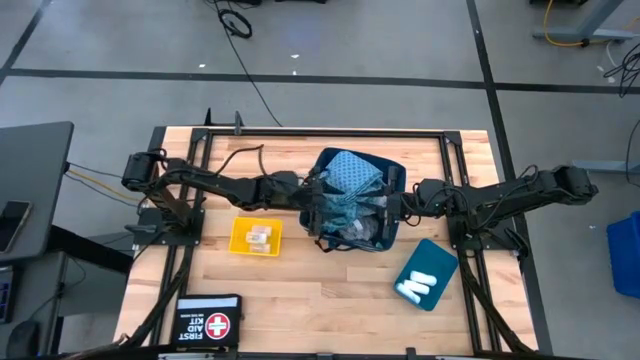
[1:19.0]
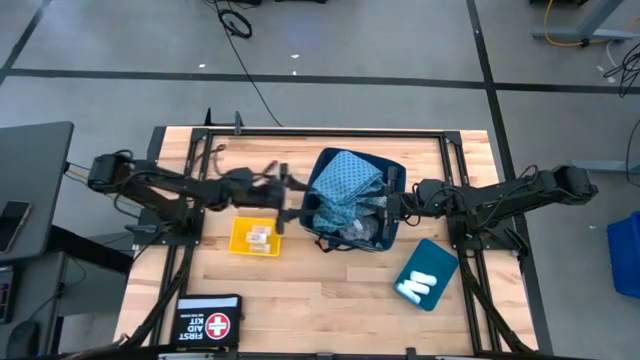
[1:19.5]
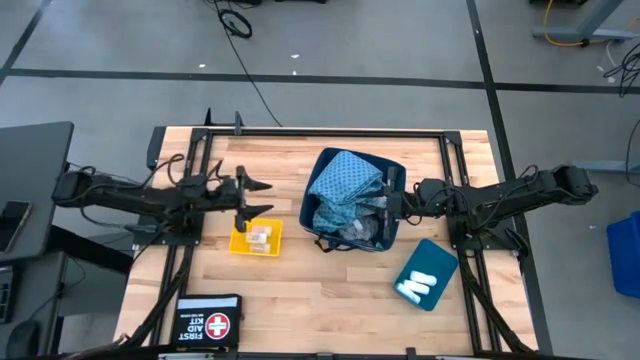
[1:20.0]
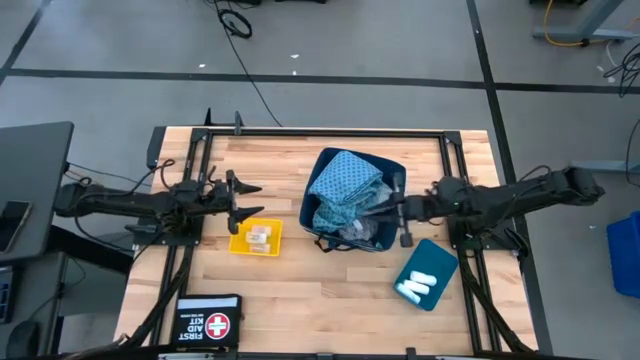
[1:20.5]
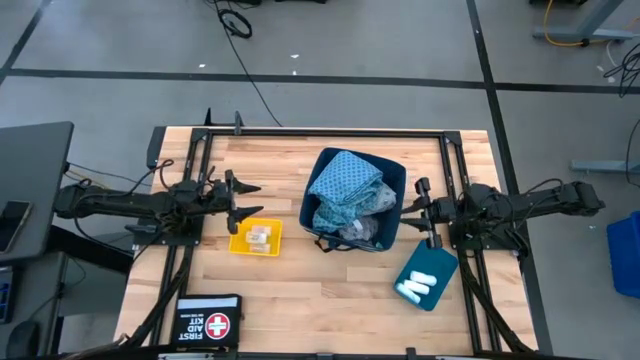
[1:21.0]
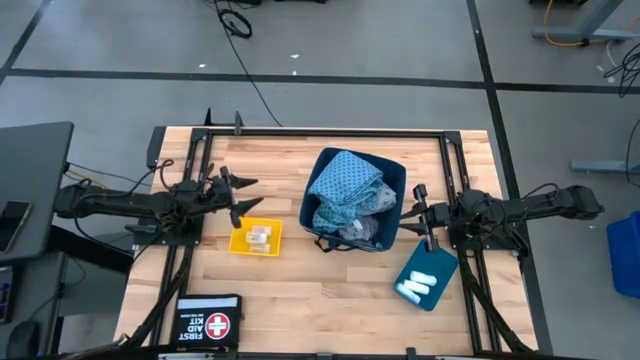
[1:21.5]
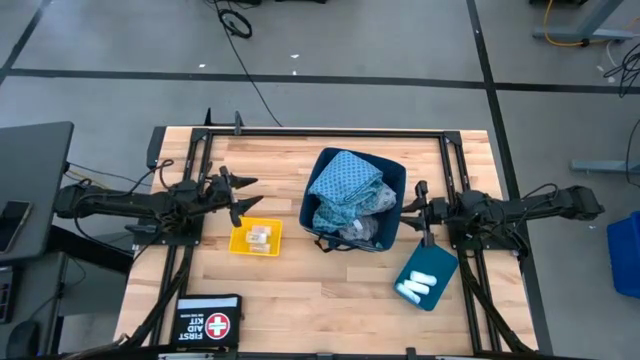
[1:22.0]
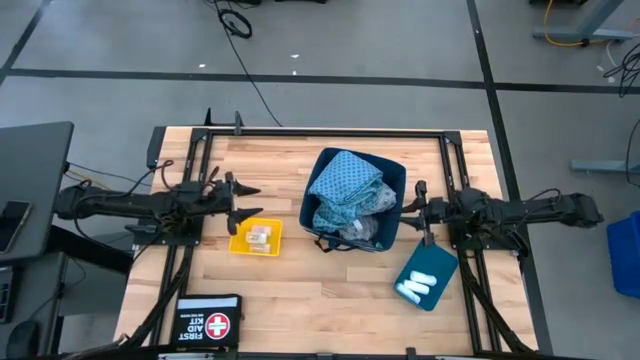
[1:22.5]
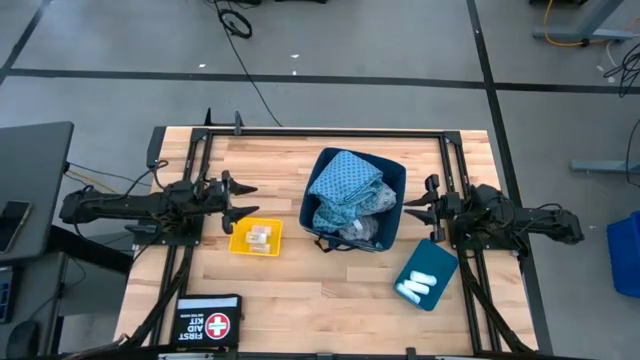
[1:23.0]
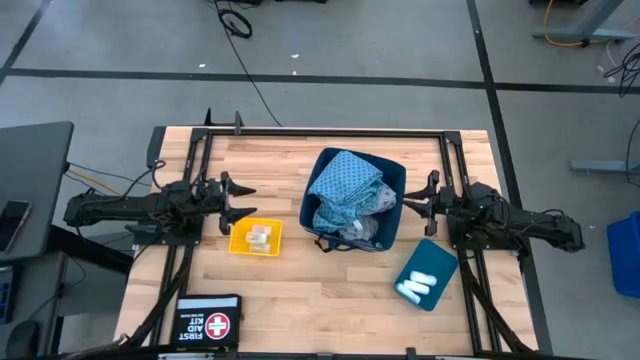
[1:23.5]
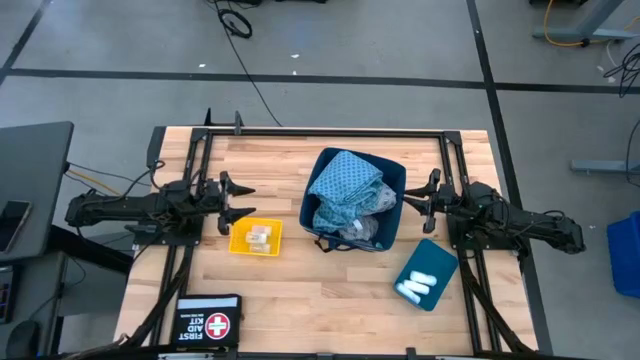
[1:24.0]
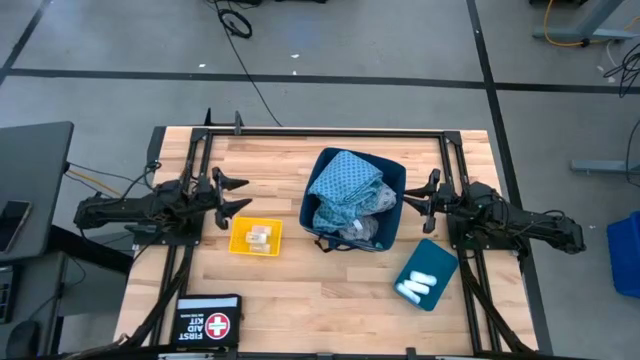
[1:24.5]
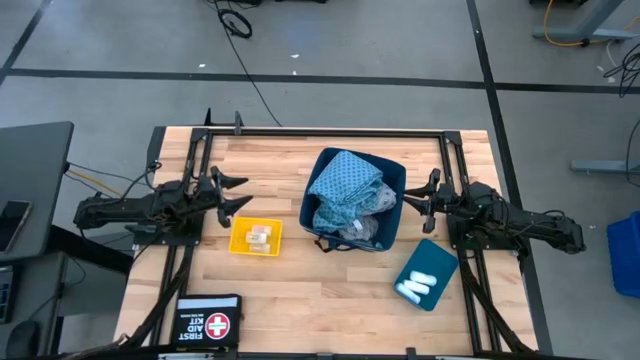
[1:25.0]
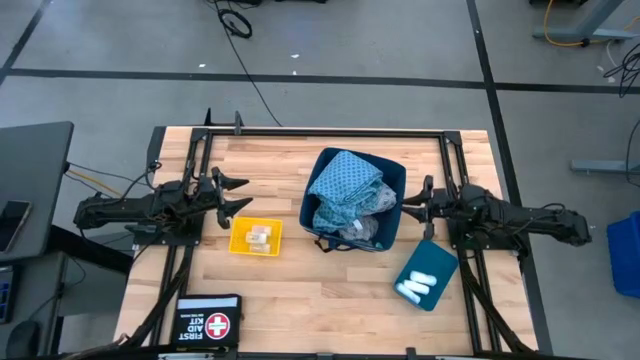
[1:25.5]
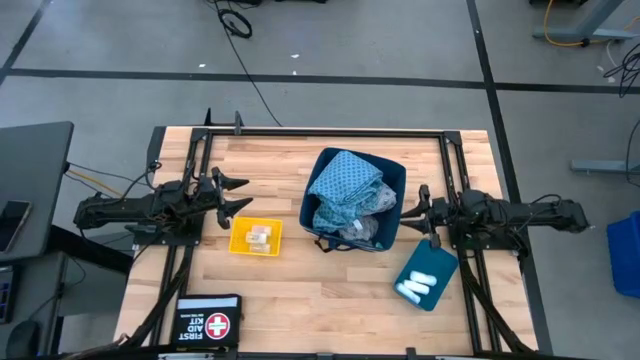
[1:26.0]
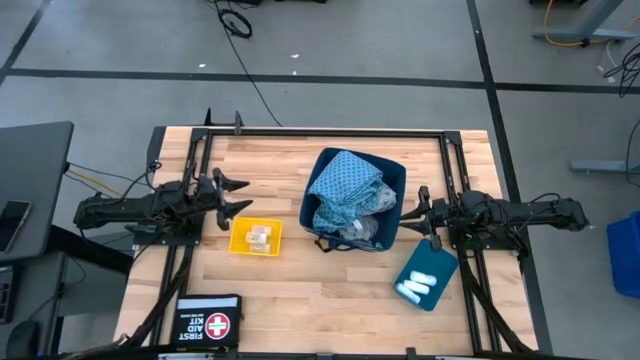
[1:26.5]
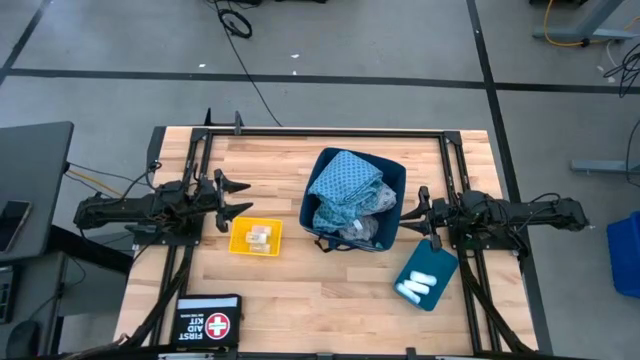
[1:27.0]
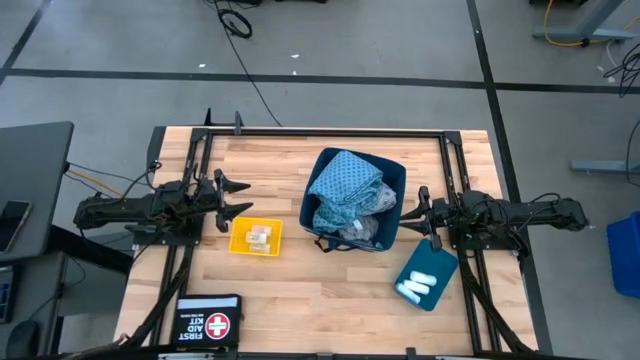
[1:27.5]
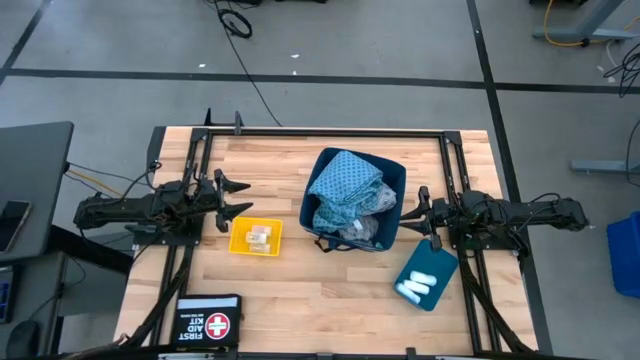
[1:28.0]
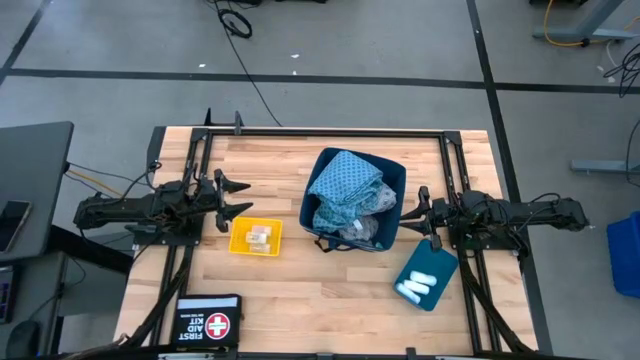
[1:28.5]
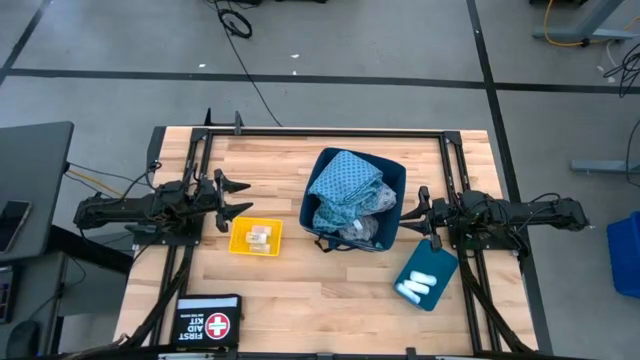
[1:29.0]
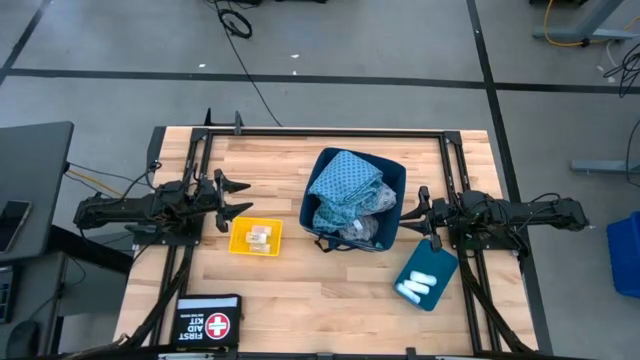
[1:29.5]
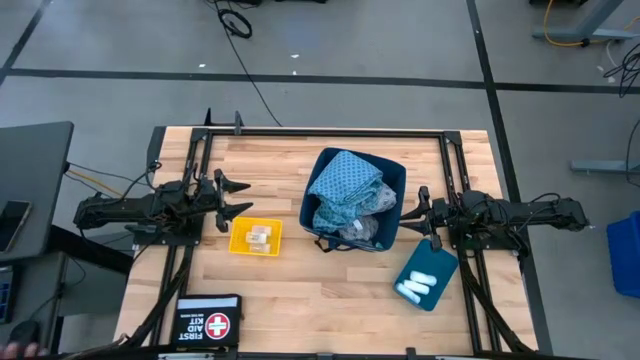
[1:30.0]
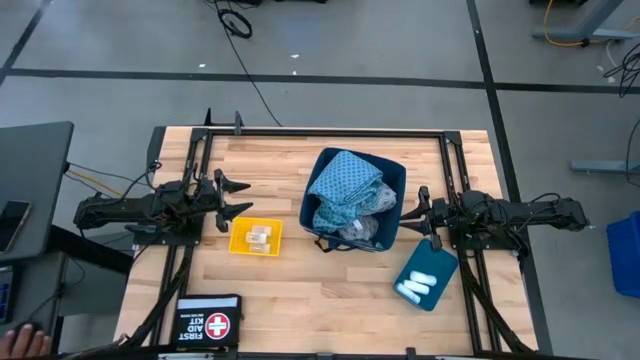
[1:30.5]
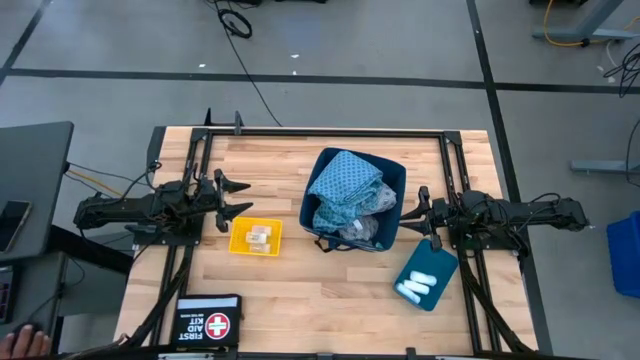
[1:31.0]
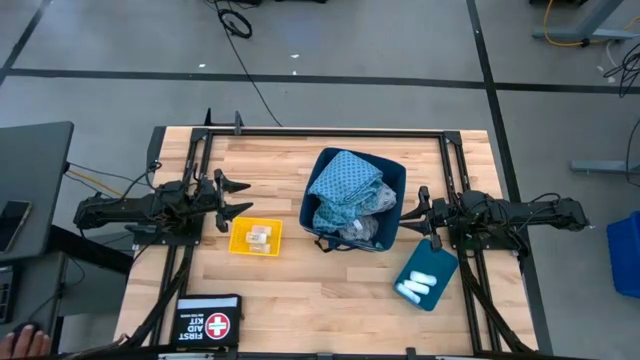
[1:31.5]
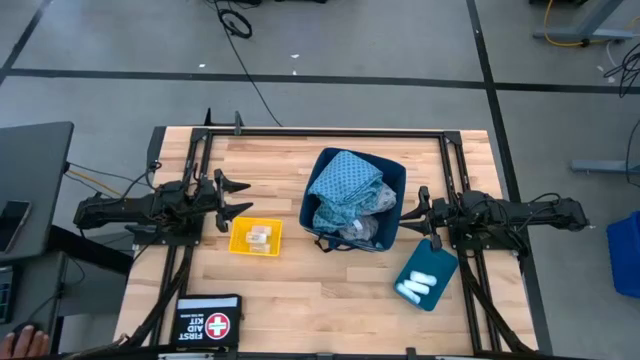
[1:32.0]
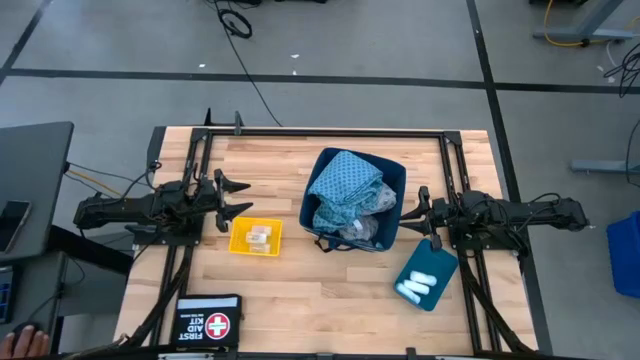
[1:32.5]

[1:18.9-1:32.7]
Task: Pick & place medical supplies in basket/bin
Return to Home Position

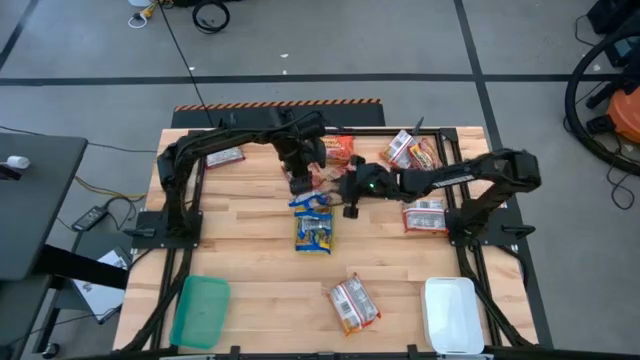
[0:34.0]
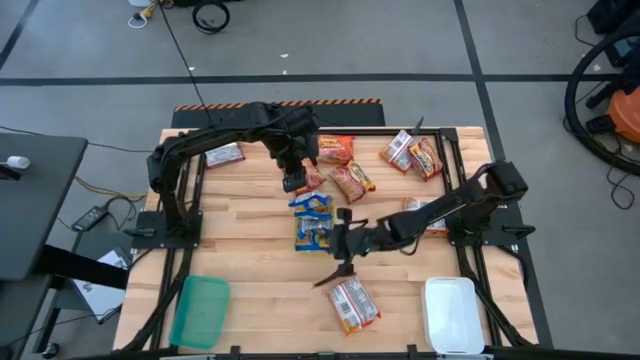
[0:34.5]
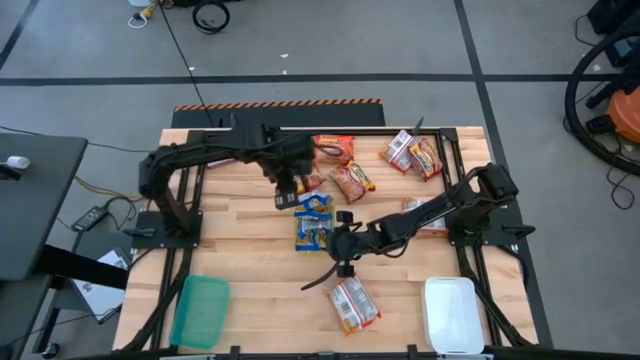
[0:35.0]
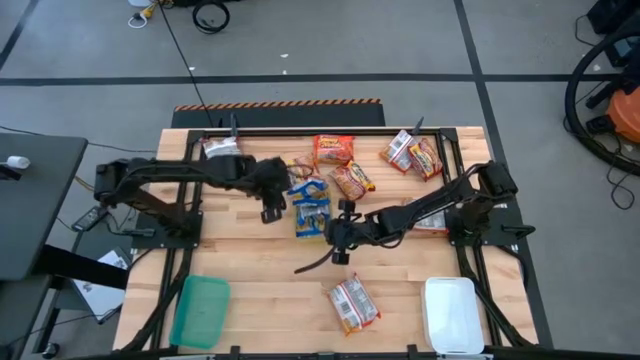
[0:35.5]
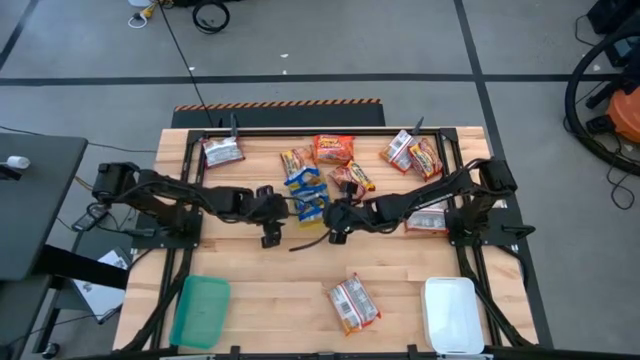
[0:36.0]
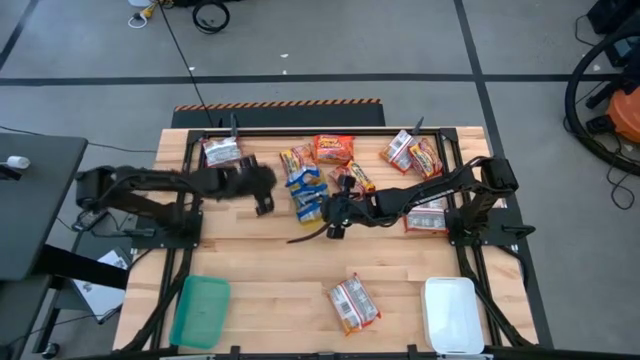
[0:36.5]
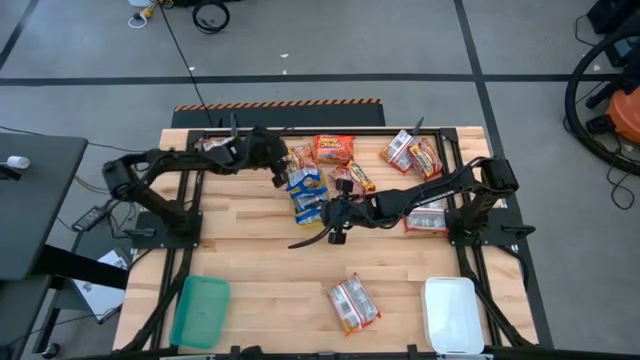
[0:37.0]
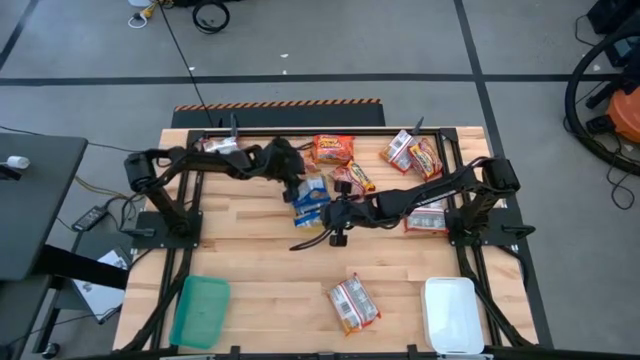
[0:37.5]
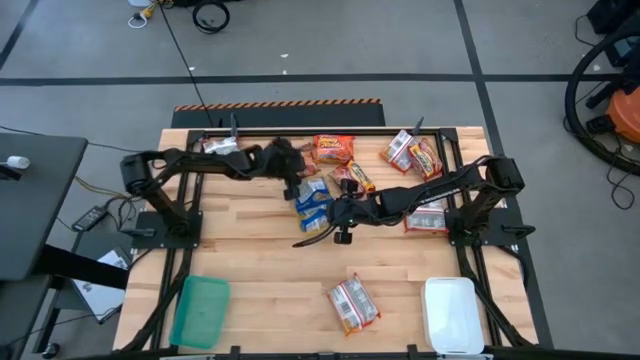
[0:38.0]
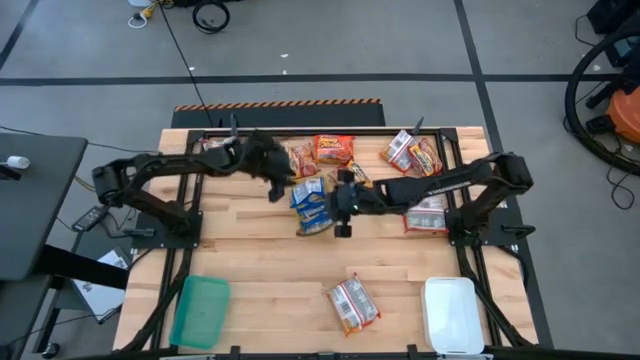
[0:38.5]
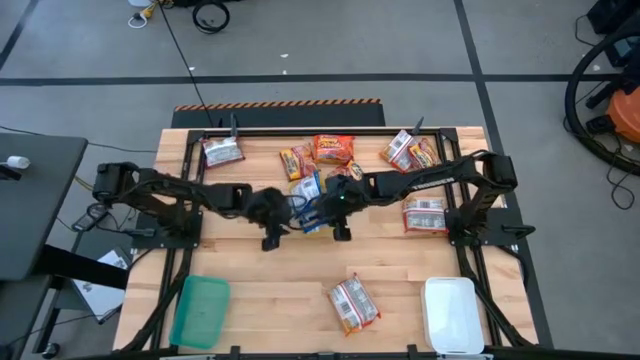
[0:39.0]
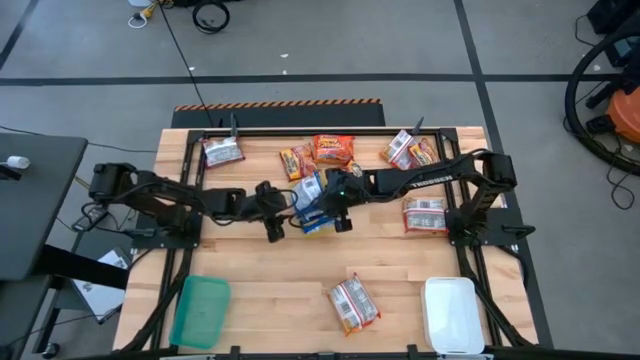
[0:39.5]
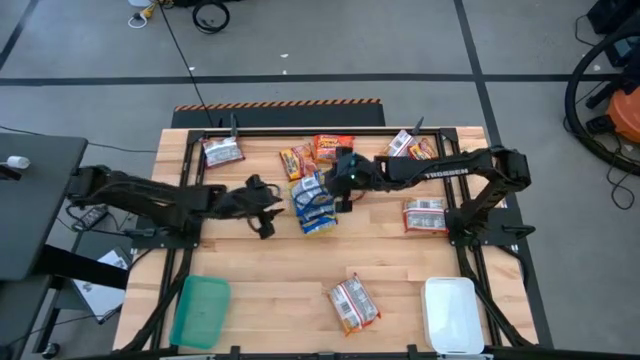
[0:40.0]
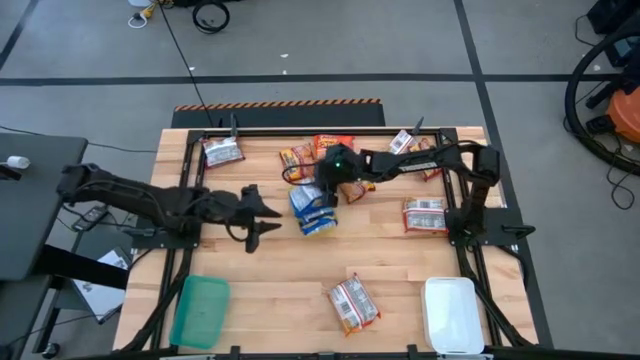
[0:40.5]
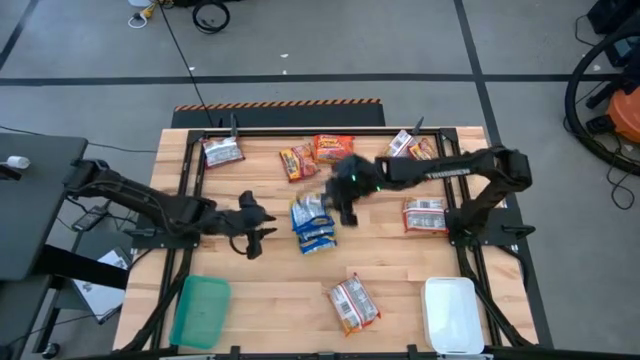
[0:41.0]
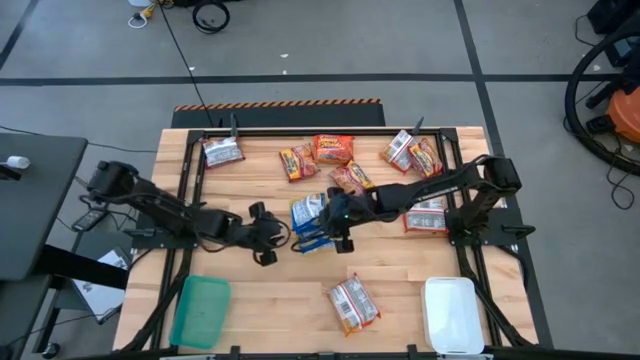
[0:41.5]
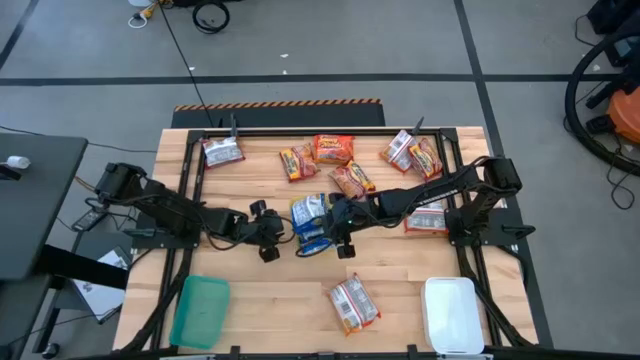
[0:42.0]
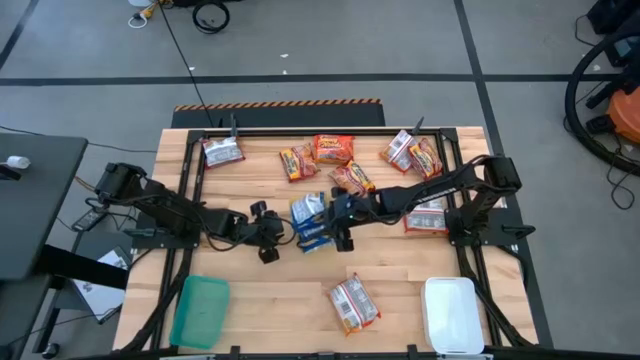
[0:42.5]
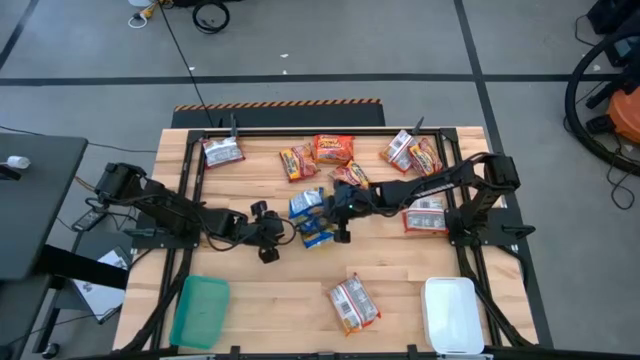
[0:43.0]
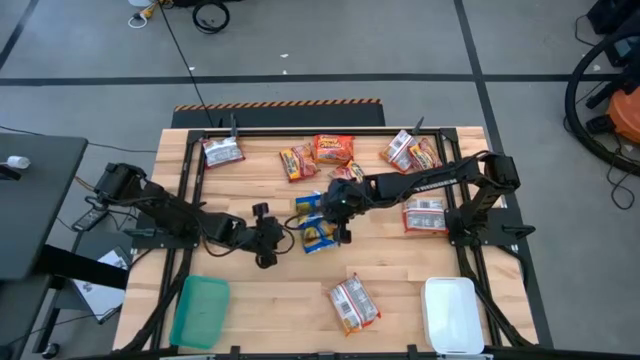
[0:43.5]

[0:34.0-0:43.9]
Task: Sort Maruchan noodles
Adjust the blue noodle packs in the yellow bin
